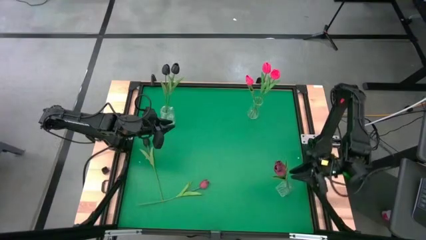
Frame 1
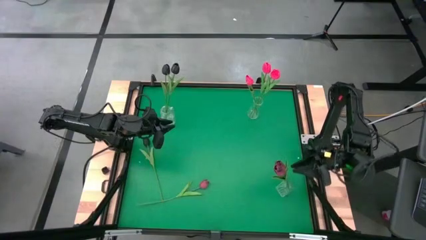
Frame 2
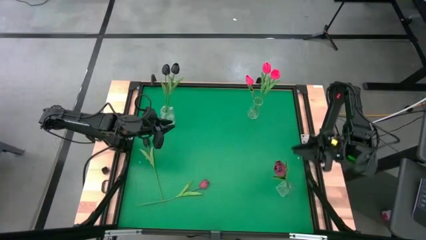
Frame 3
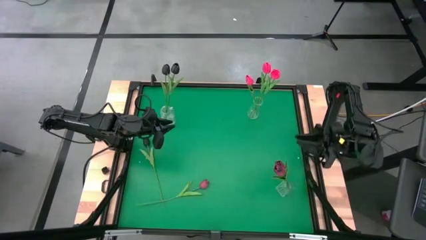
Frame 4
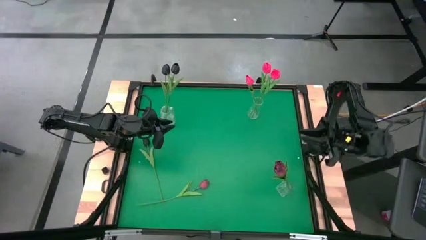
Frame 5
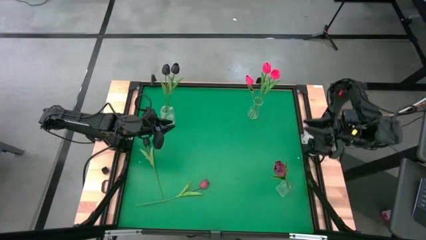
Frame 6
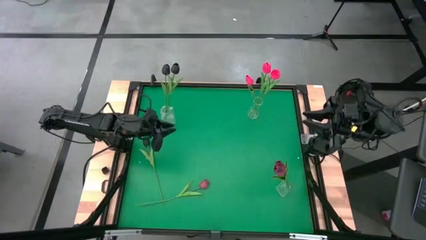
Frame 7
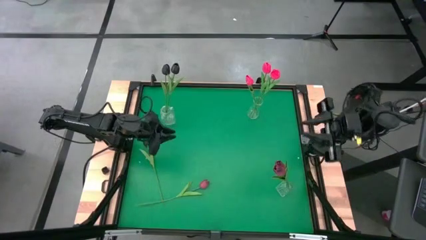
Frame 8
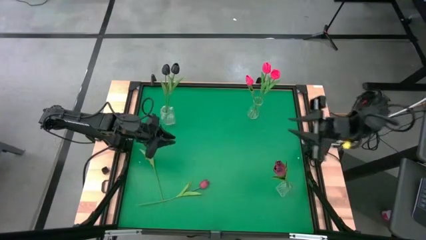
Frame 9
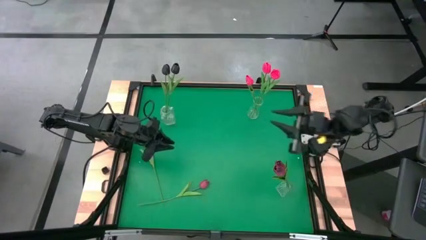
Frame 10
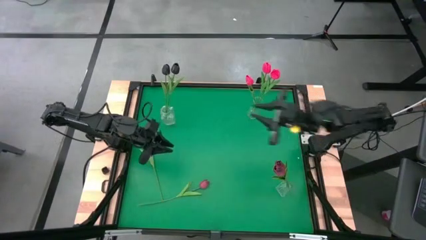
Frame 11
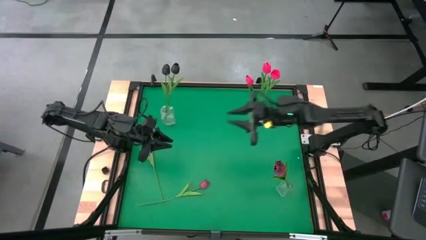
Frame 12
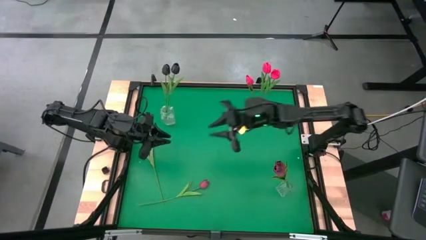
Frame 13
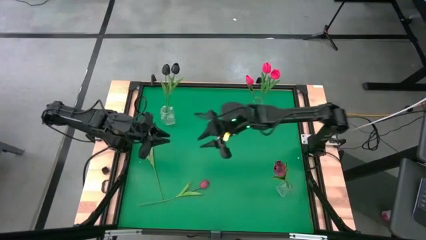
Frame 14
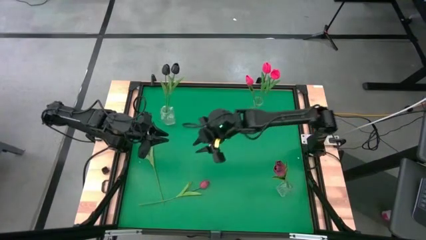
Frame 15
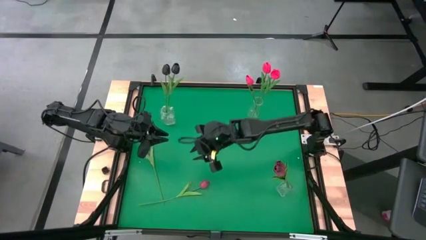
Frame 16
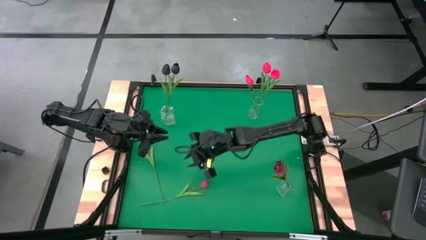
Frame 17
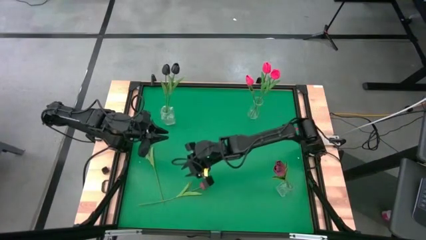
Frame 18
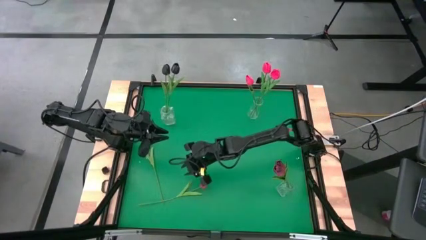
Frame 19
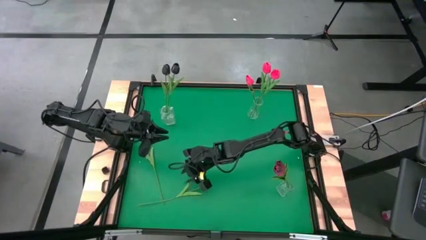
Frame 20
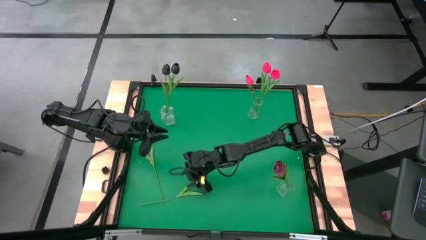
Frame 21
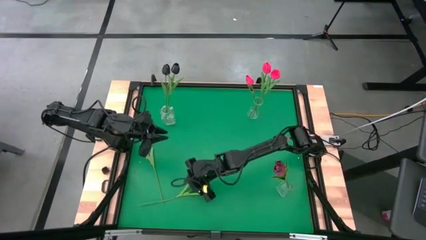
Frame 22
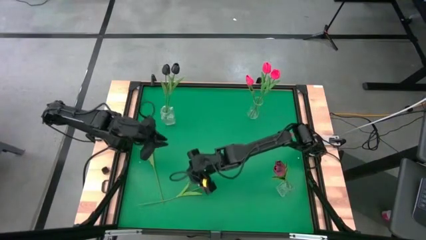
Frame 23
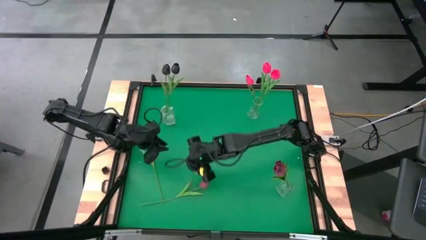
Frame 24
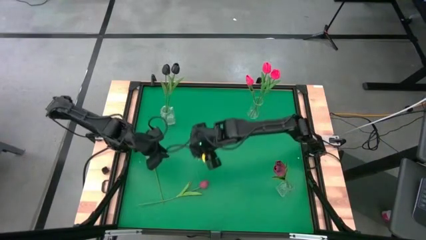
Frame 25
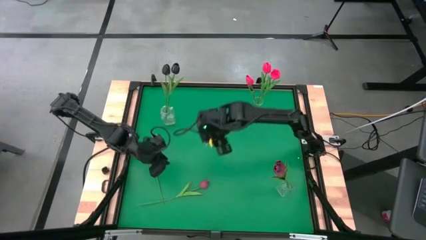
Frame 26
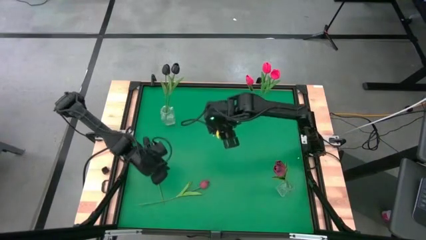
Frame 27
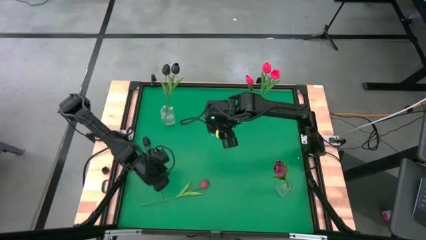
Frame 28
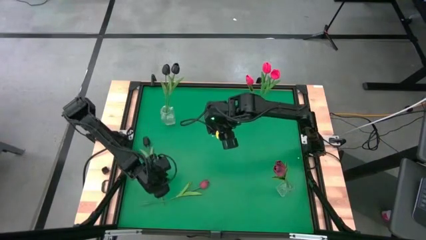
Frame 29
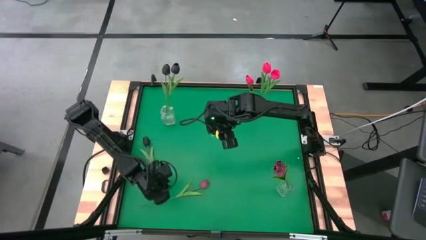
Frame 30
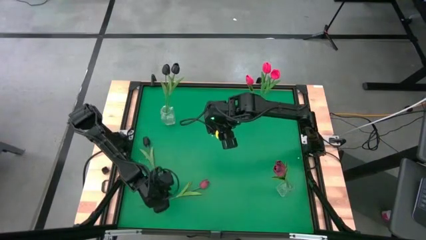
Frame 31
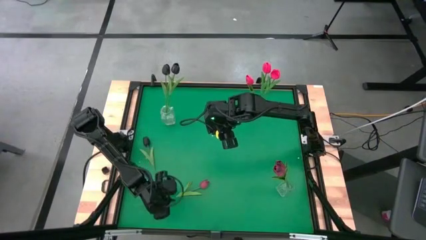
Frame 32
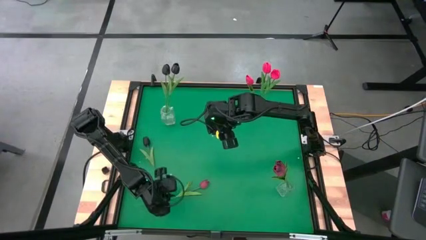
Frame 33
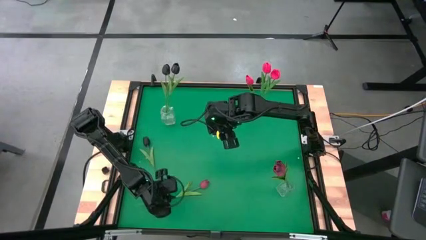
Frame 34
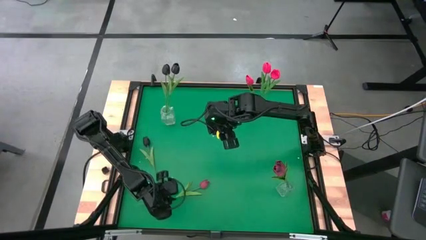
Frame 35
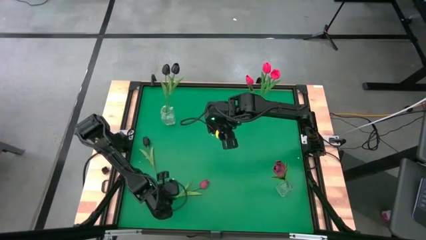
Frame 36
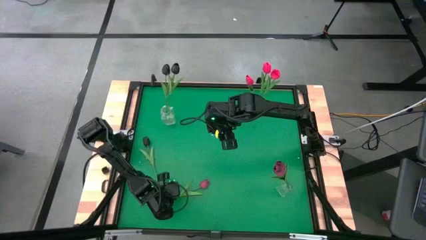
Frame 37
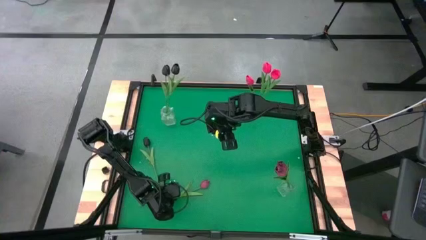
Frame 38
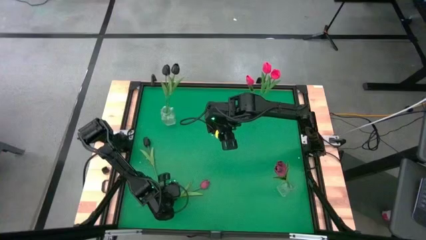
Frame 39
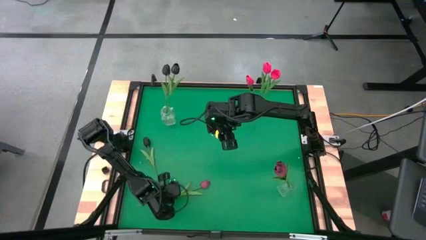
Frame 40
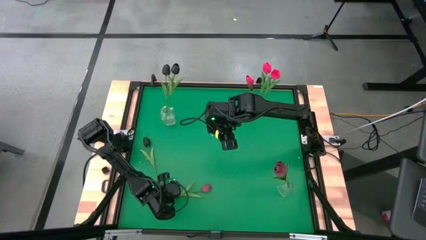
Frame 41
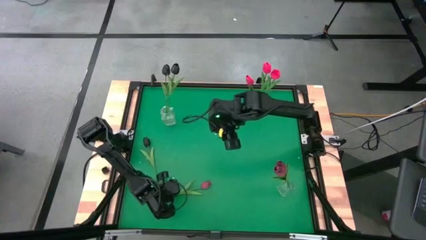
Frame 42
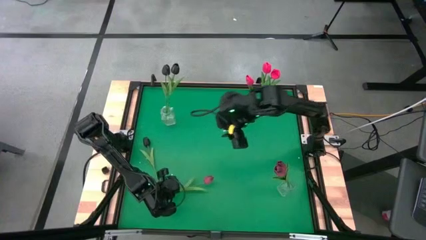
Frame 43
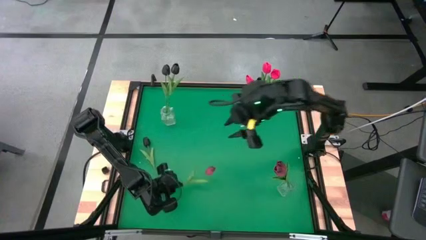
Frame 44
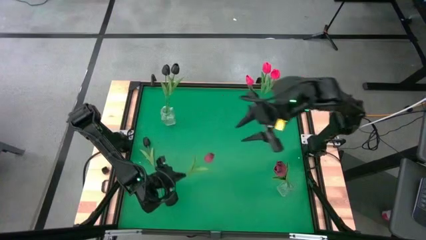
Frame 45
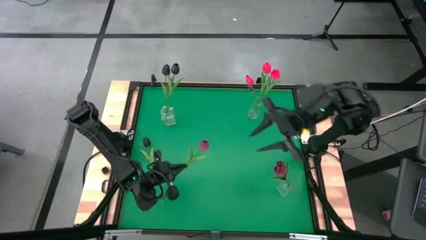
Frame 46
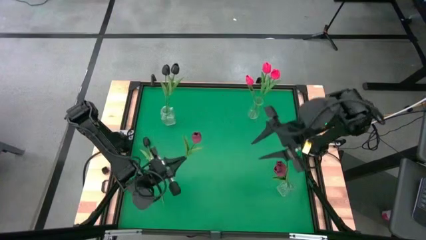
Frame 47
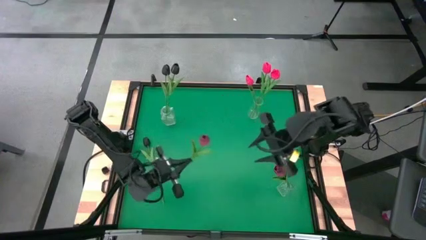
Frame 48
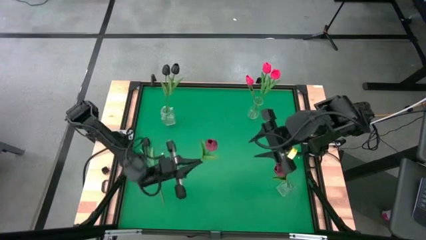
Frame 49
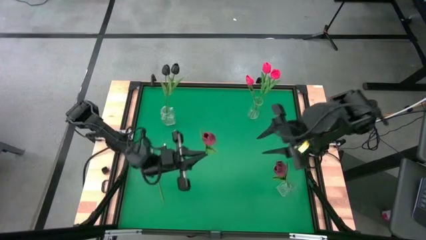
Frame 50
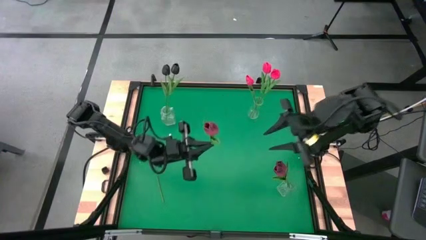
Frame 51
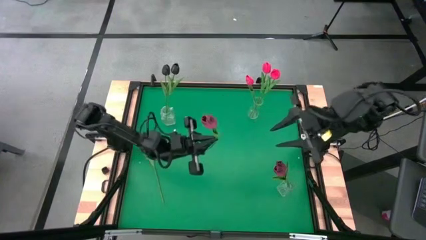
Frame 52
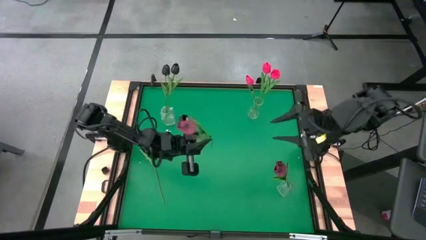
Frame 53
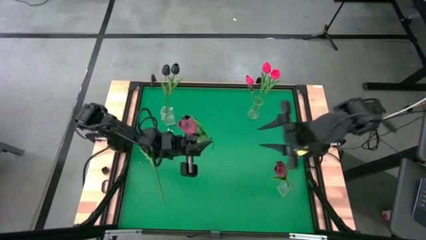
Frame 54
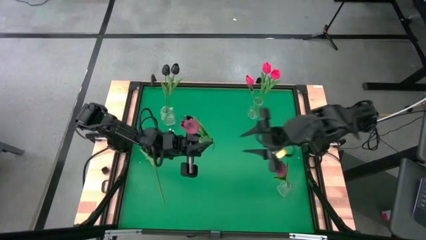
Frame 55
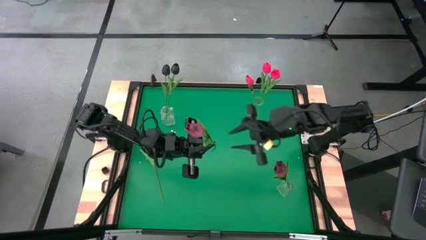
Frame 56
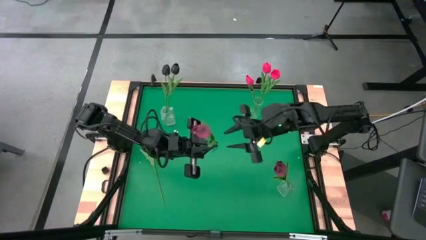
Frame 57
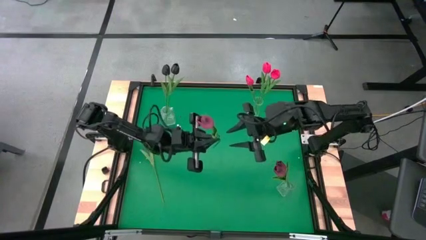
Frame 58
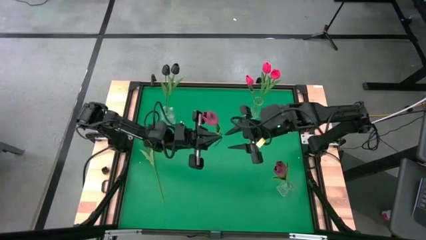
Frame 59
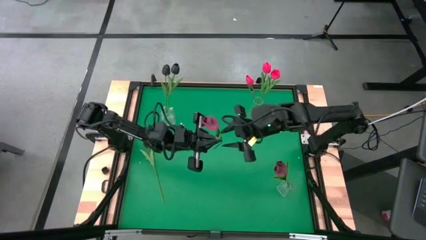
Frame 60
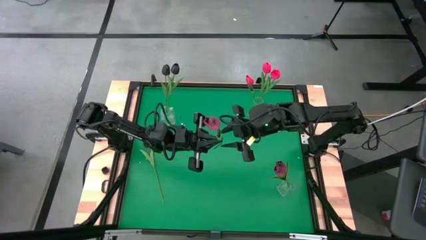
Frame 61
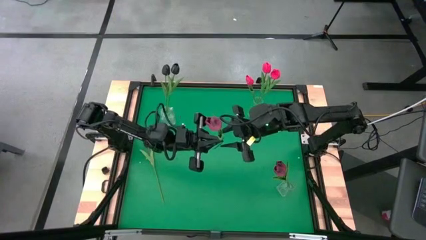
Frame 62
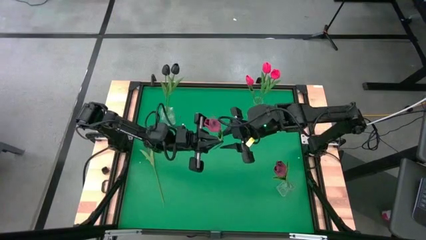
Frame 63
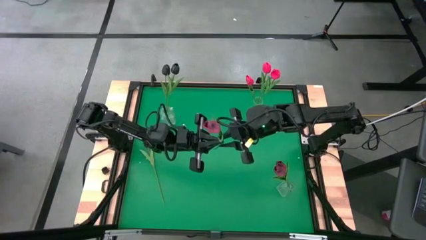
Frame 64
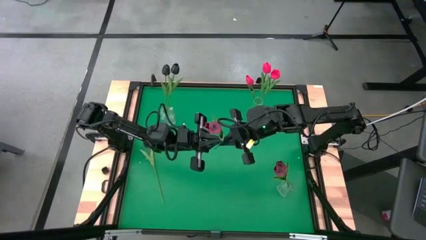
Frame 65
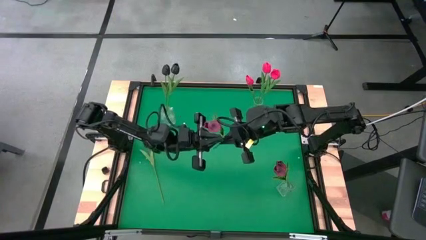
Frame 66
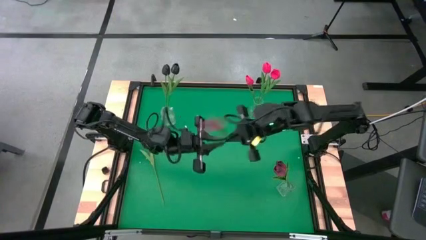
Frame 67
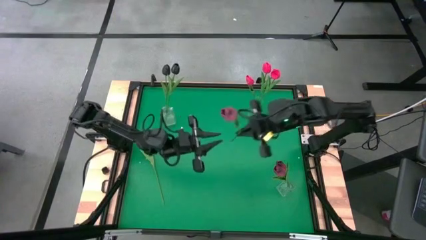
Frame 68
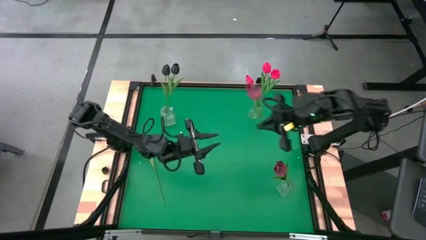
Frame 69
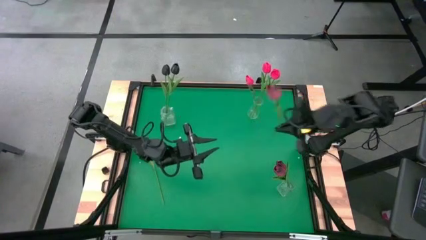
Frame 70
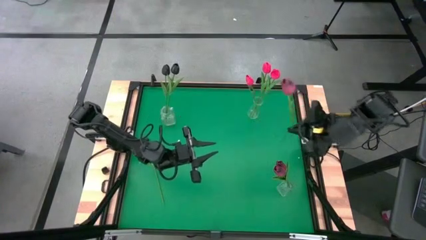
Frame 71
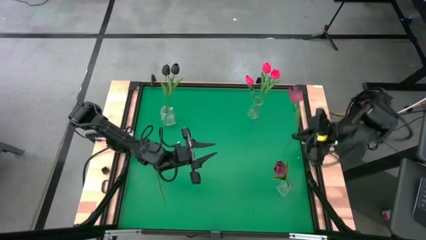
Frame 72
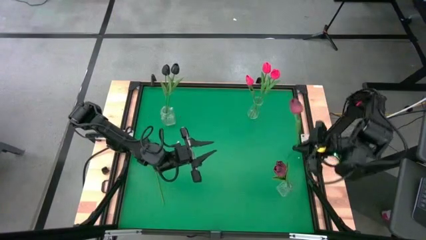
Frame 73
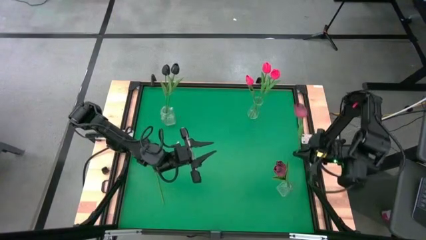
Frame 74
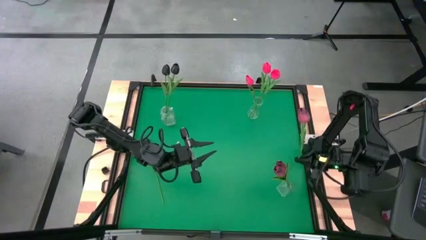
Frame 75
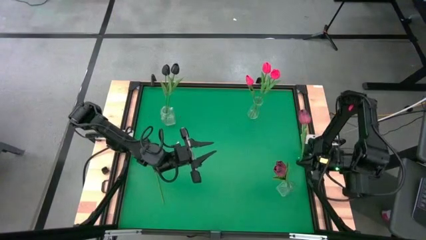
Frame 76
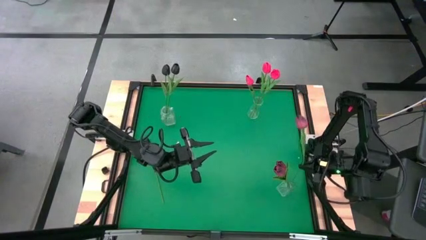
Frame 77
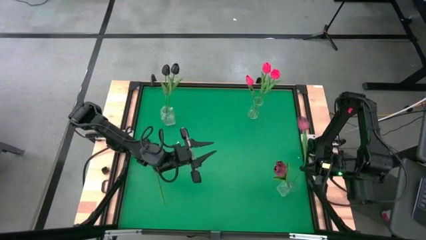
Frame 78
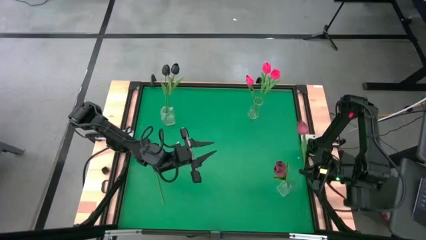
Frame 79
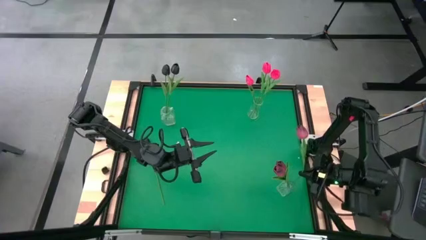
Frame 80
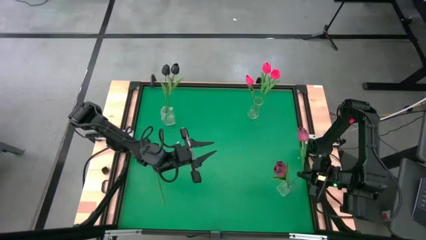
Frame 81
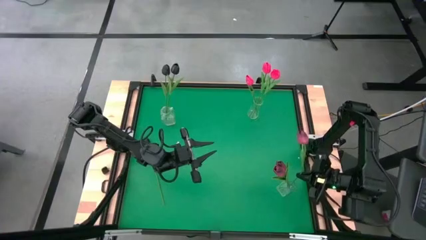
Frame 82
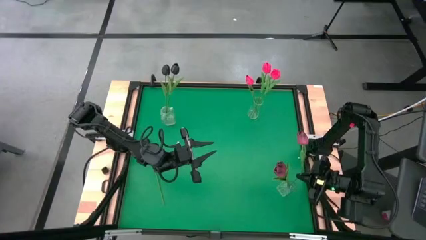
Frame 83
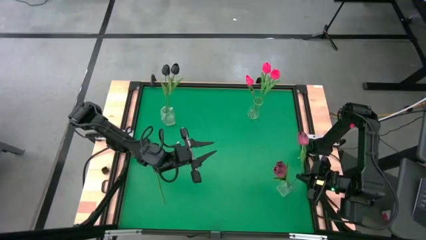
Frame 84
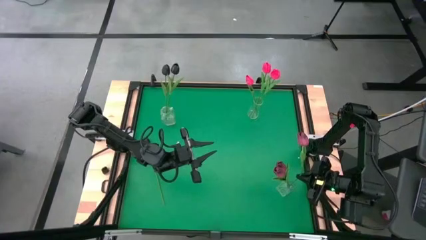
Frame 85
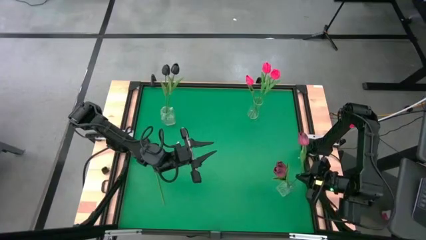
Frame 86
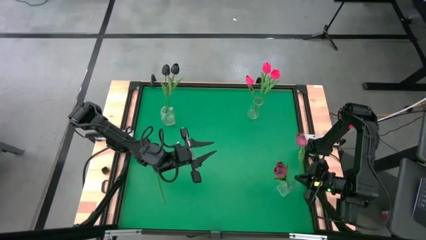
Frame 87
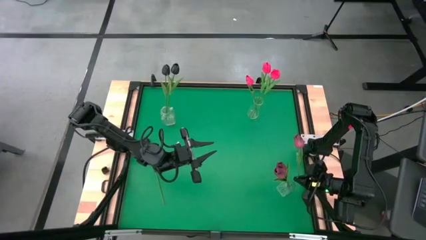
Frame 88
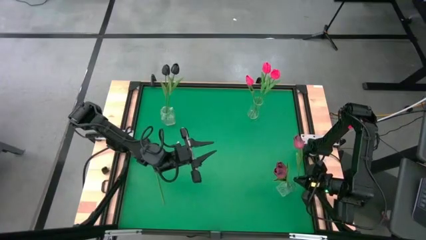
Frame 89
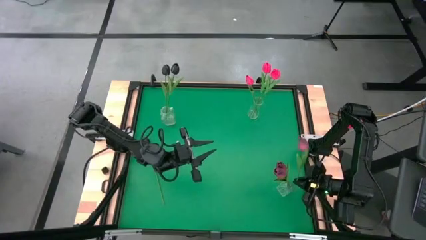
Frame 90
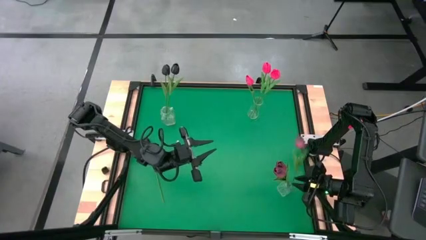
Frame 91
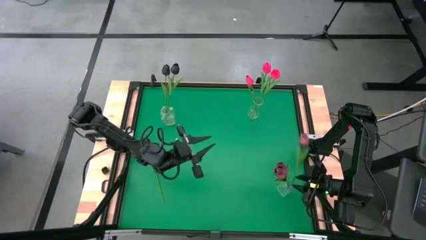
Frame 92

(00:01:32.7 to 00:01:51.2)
Task: Sort flowers into vase by color
Put the red flower into the bottom transparent vase
